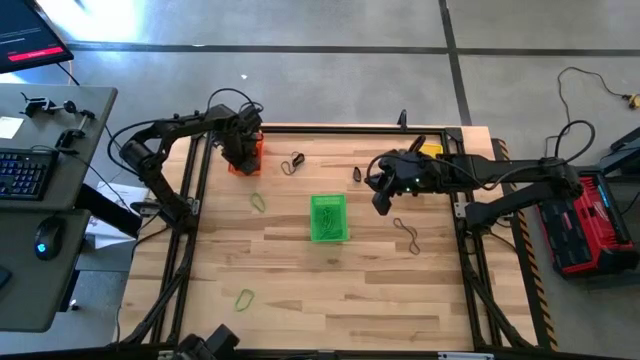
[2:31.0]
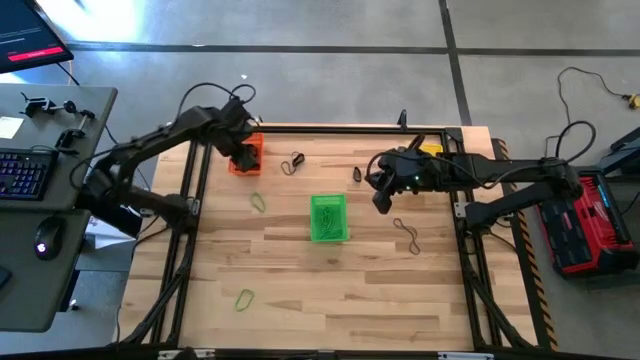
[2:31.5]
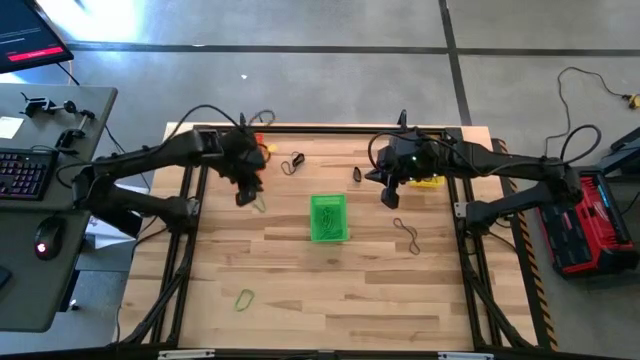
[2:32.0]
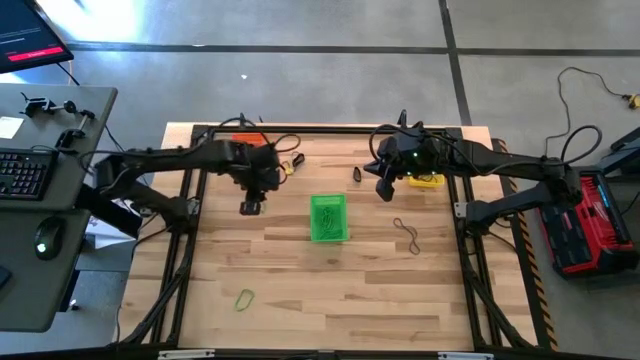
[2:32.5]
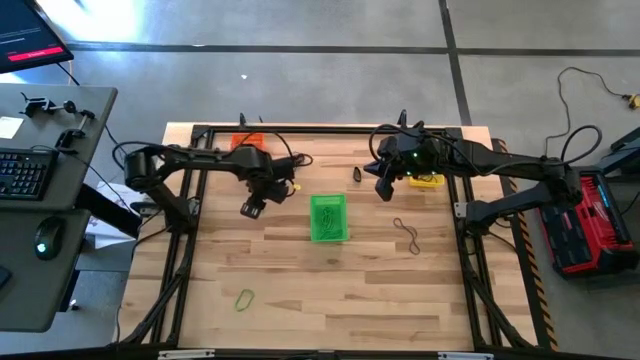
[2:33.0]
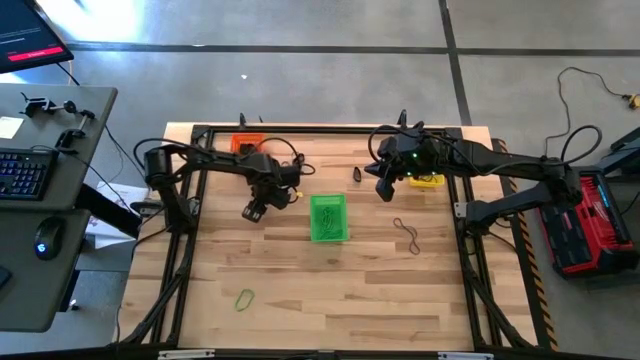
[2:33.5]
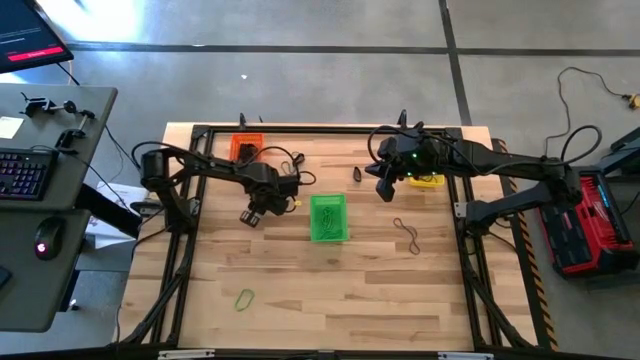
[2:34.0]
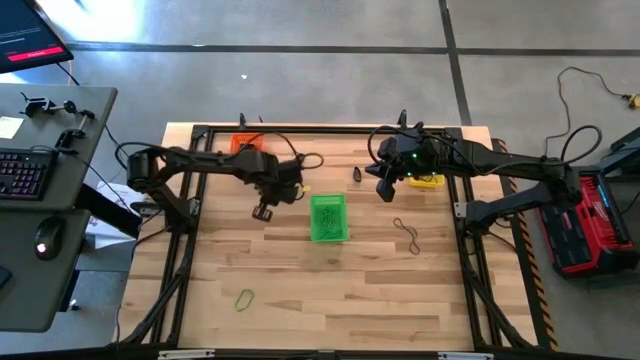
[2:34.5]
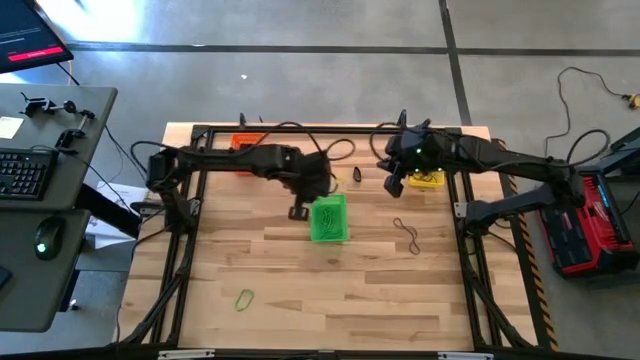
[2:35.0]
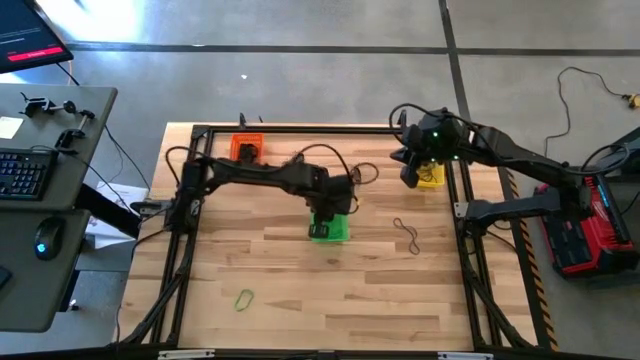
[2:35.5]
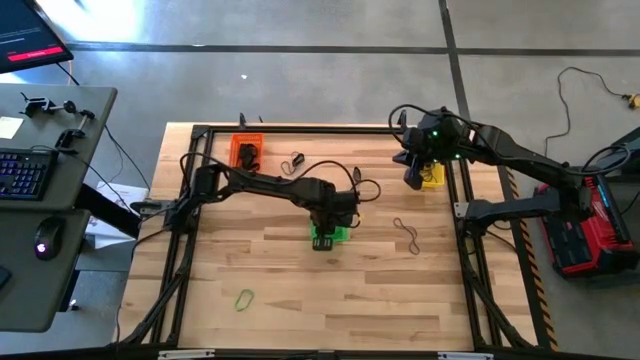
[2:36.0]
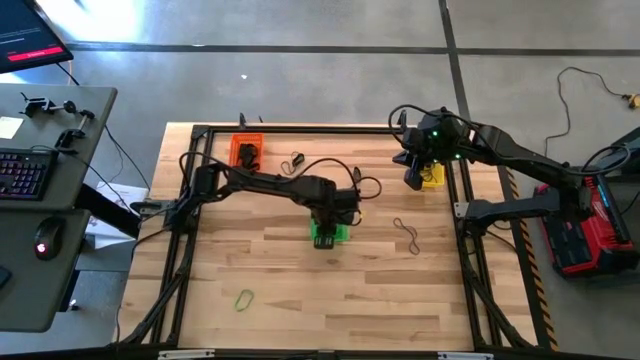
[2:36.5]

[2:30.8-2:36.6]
Task: Sort rubber bands into baskets
Put the green rubber band into the green bin

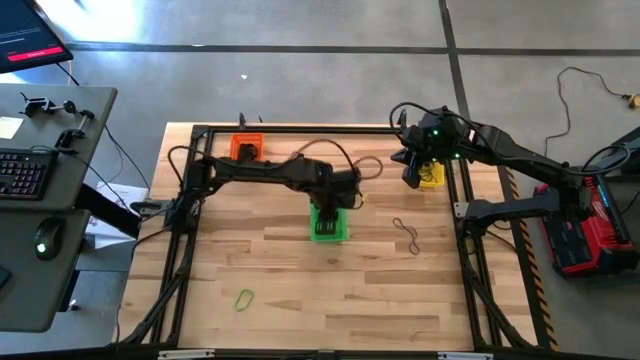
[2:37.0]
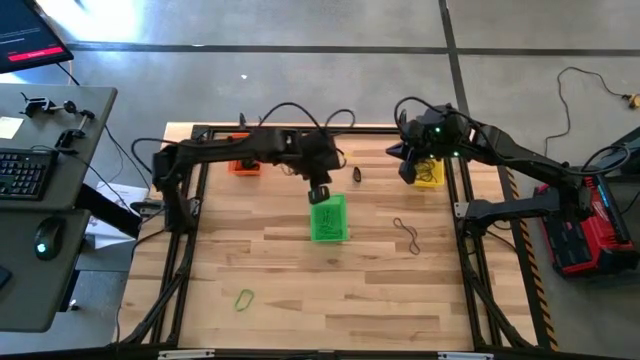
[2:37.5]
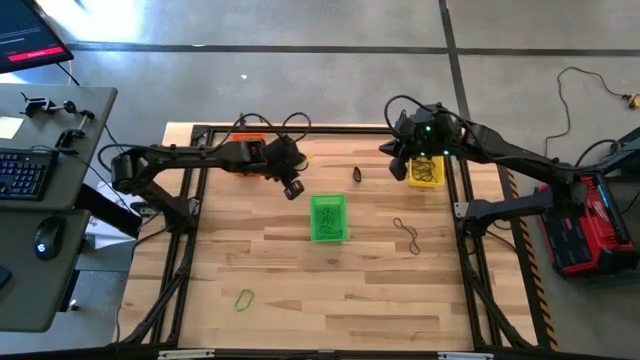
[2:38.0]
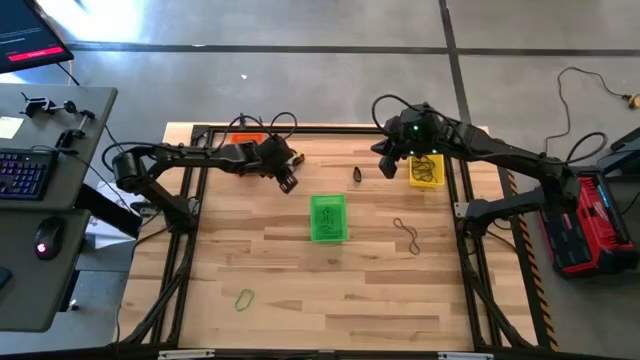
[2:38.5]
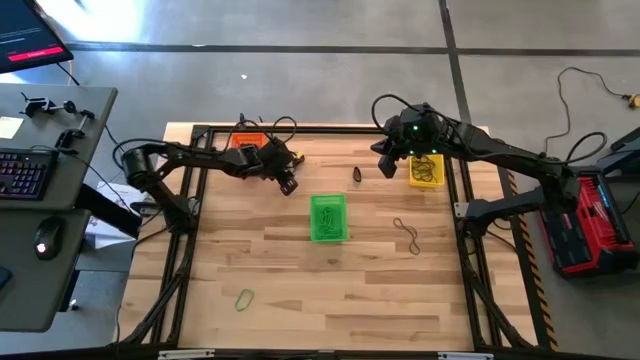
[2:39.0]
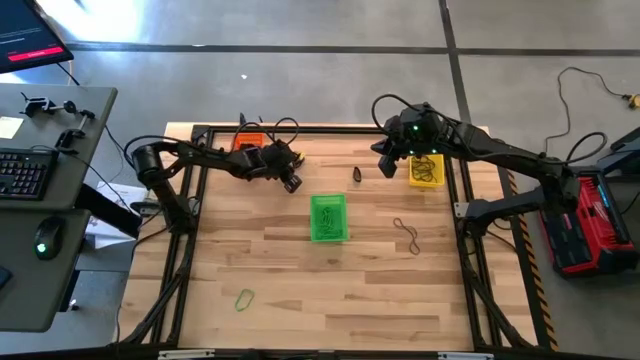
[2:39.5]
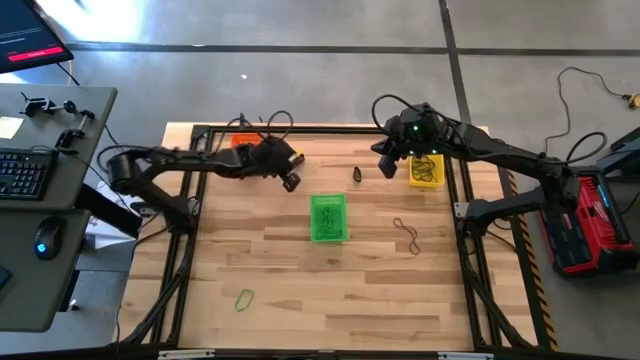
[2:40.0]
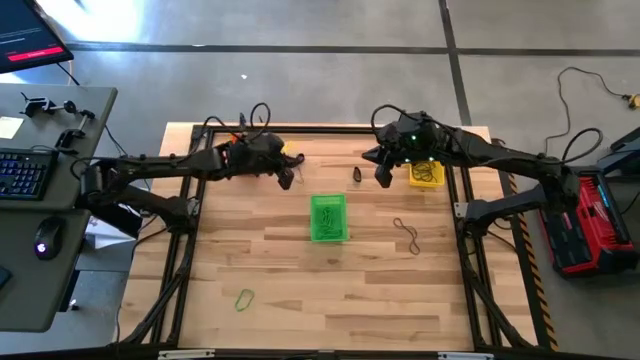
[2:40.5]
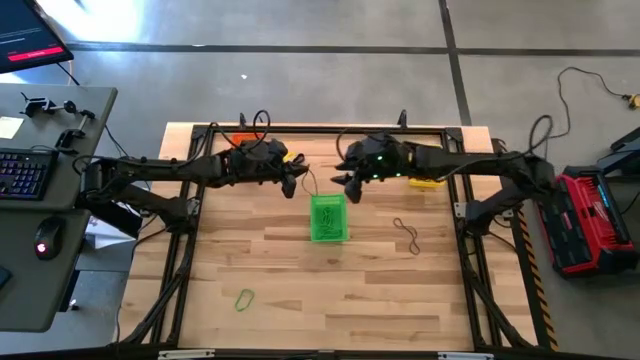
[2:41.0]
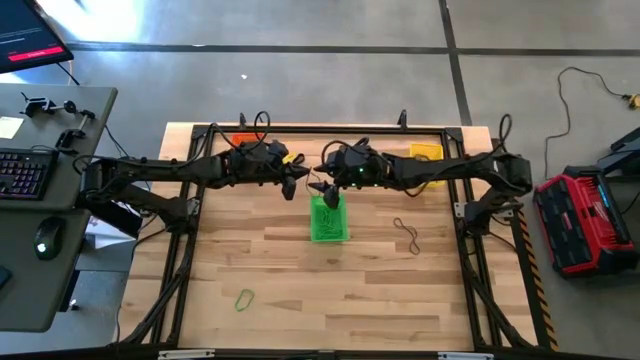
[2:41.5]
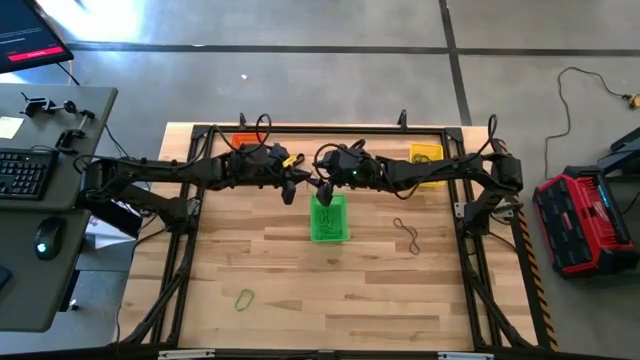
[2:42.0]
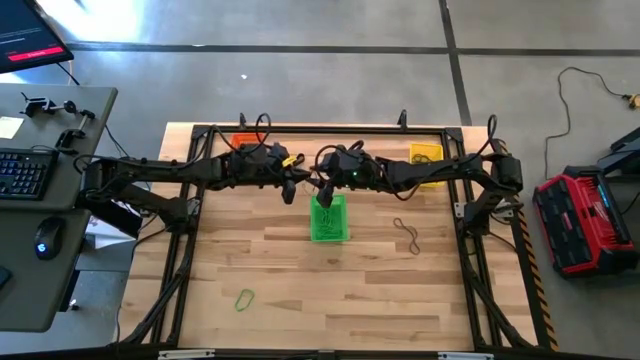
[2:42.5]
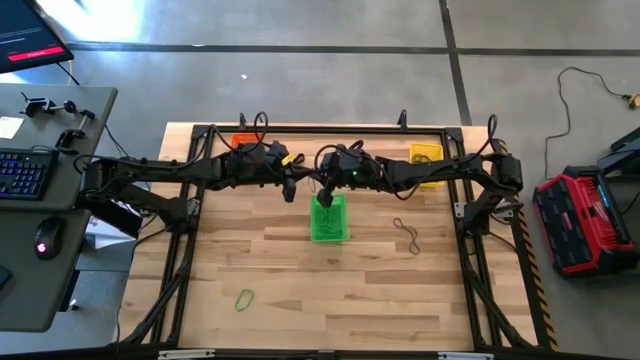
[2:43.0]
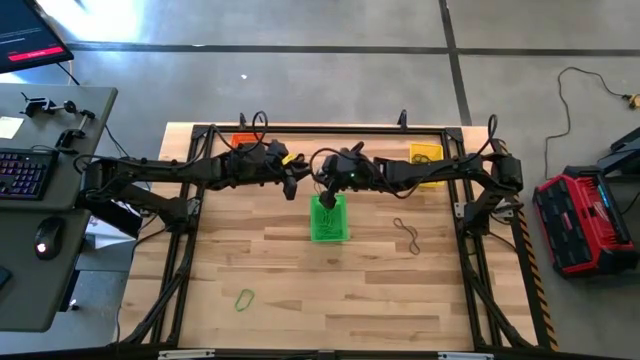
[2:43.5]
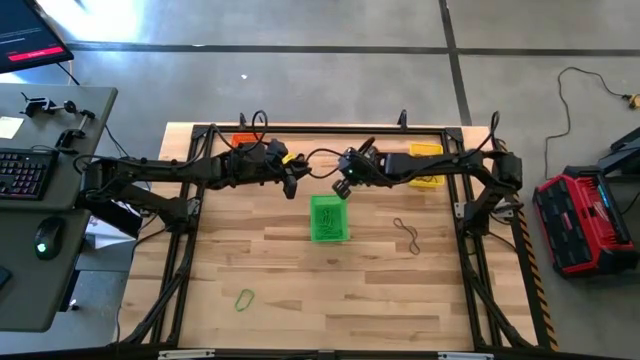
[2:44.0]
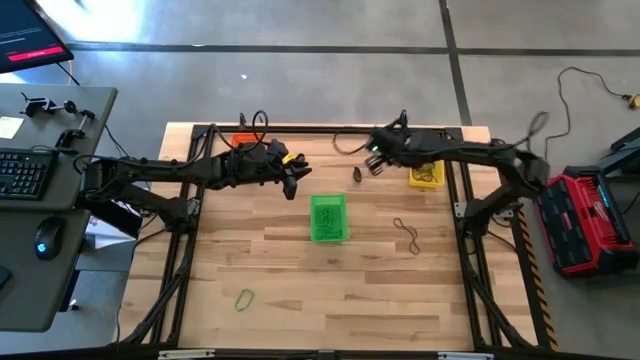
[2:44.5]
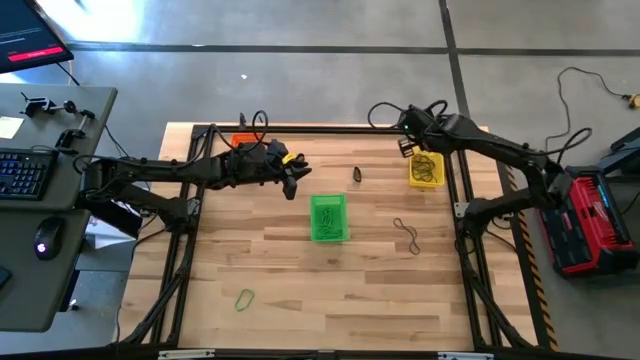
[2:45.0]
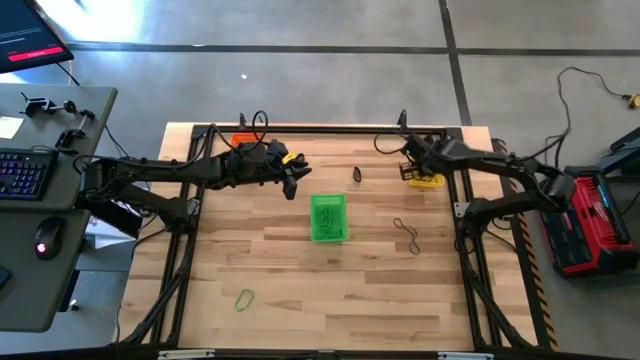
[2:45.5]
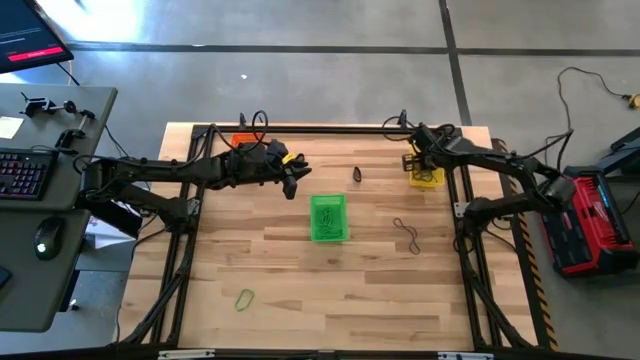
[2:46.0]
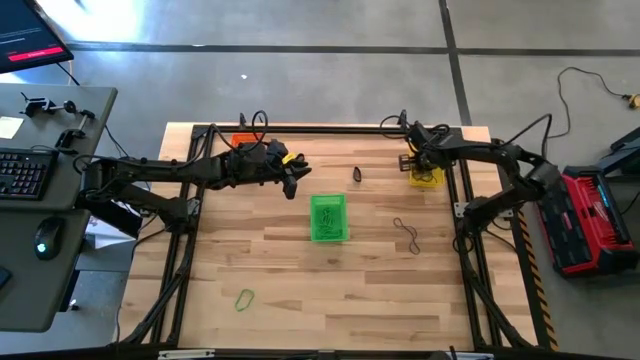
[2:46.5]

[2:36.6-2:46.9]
Put the purple rubber band into the yellow bin

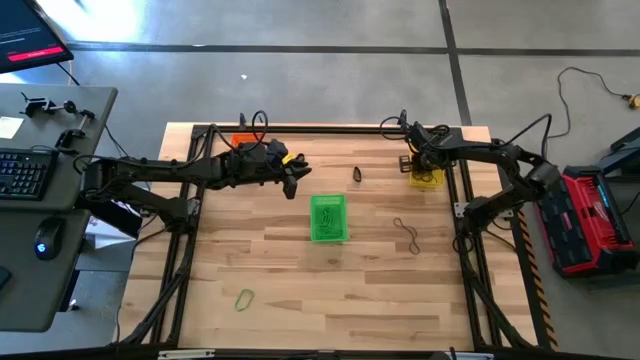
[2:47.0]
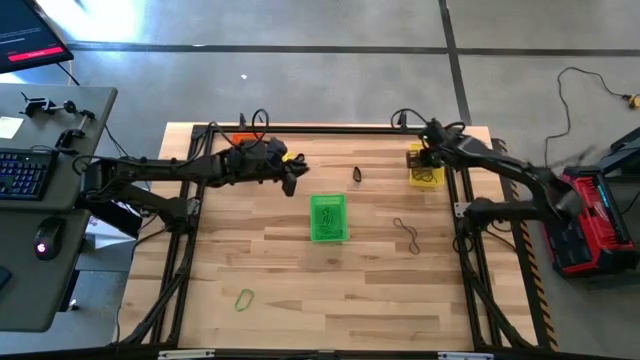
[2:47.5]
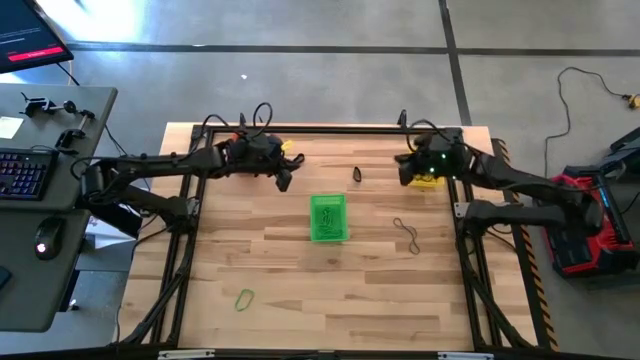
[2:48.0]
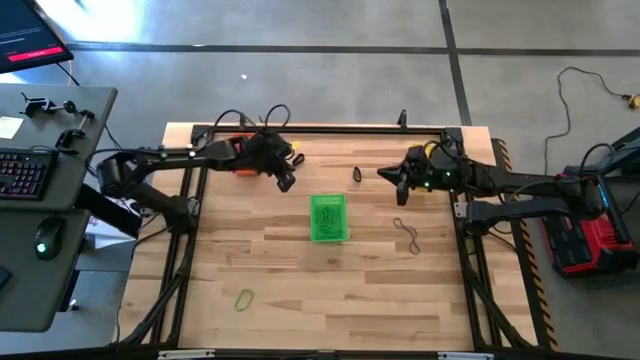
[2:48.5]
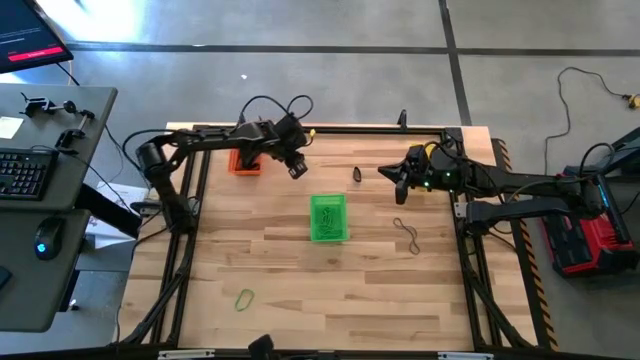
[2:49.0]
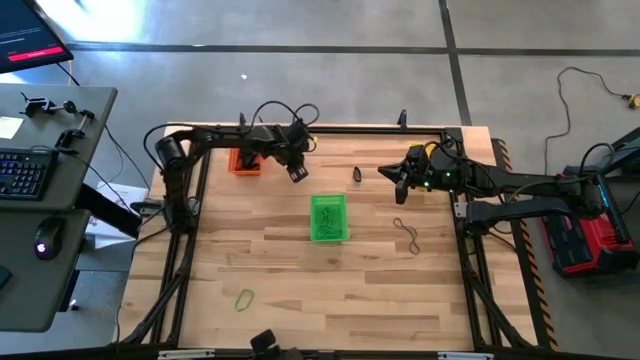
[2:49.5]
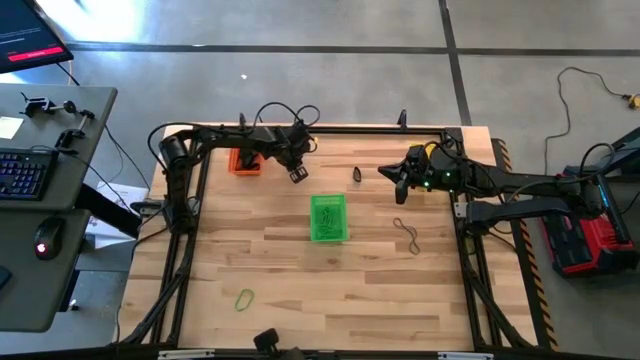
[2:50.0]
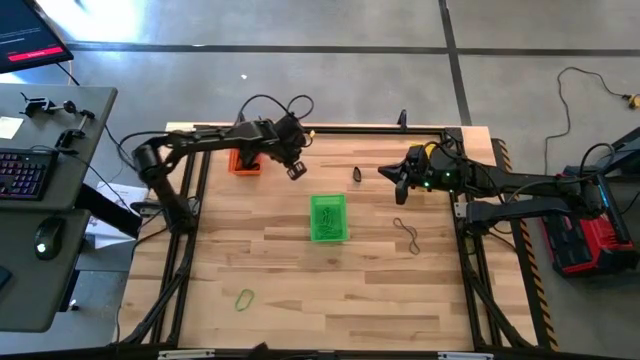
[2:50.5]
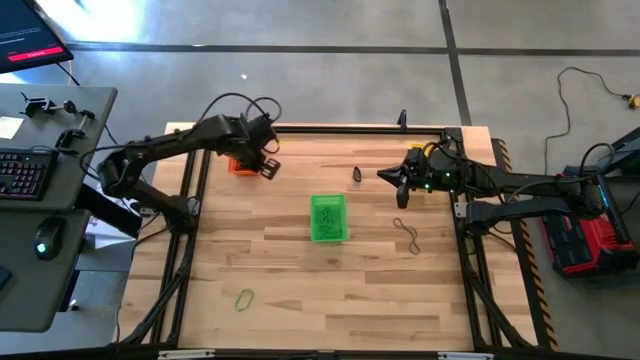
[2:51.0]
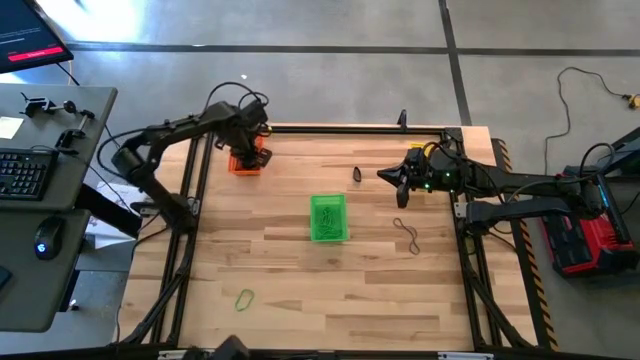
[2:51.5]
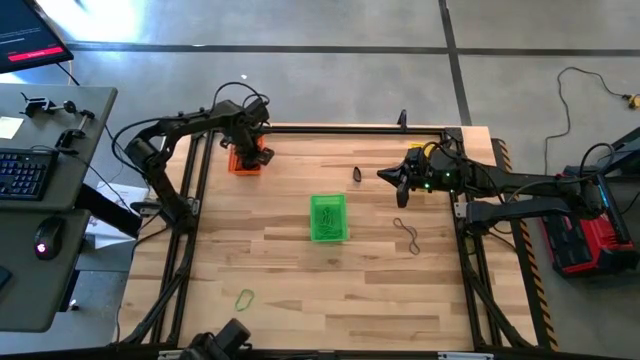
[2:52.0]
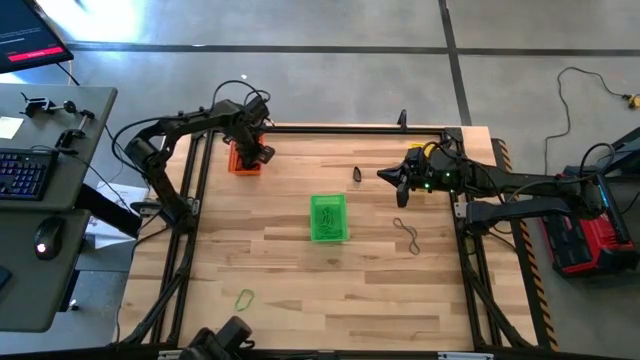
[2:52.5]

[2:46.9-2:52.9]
Put the black rubber band into the orange bin
